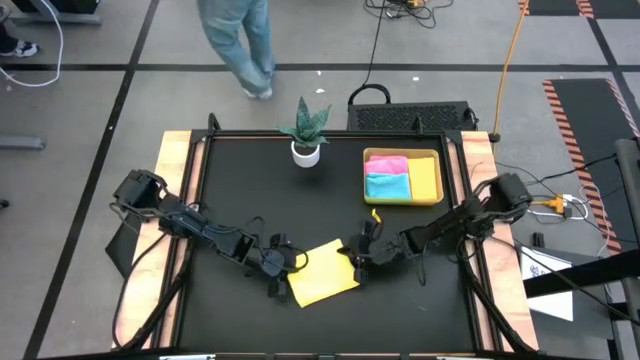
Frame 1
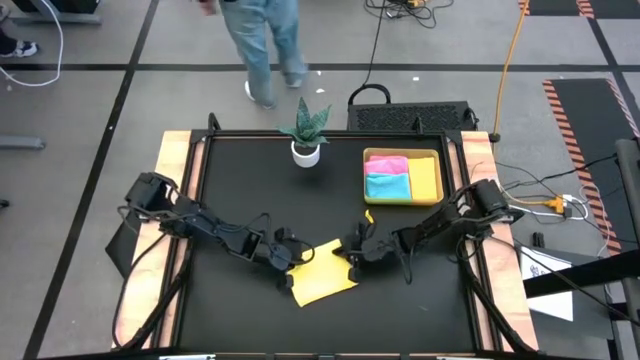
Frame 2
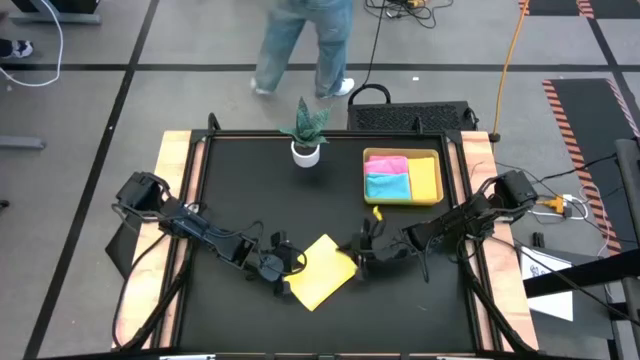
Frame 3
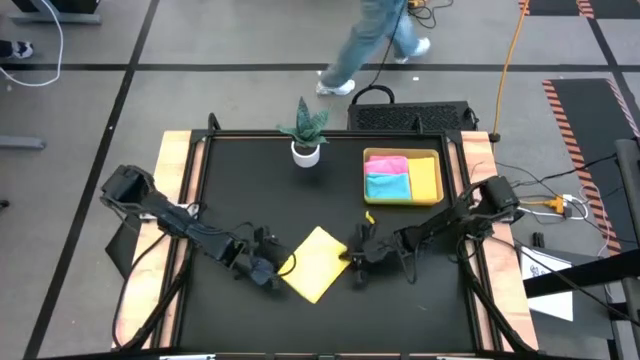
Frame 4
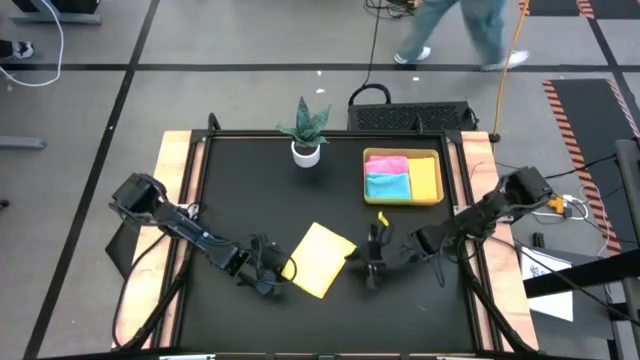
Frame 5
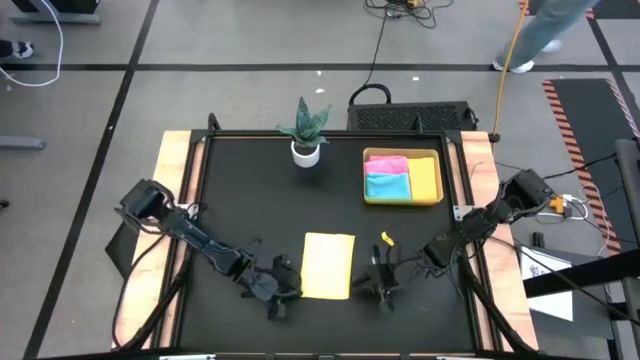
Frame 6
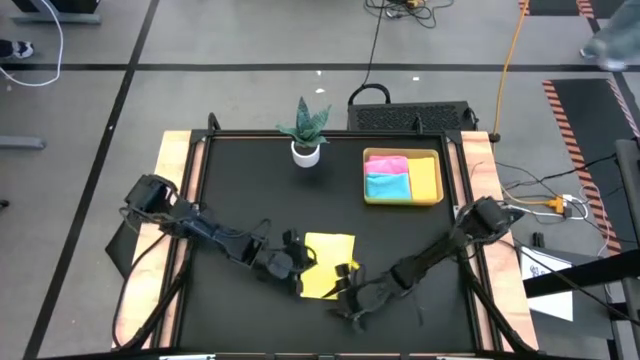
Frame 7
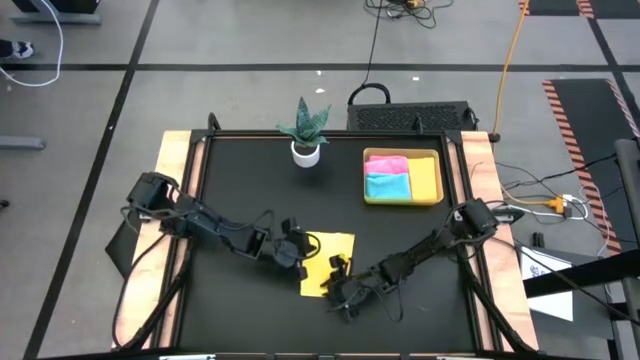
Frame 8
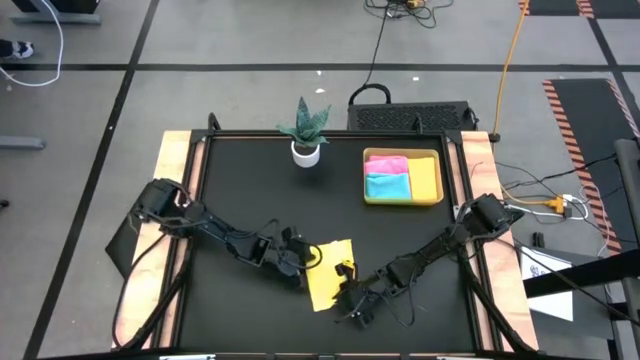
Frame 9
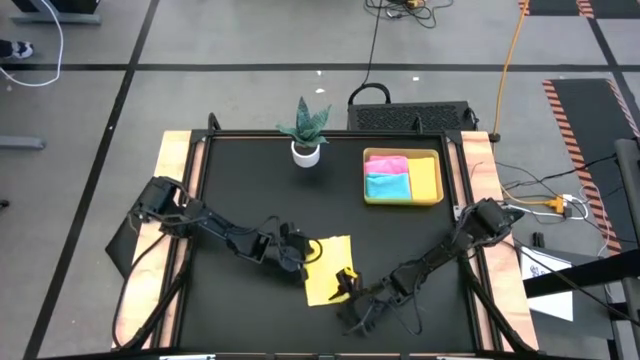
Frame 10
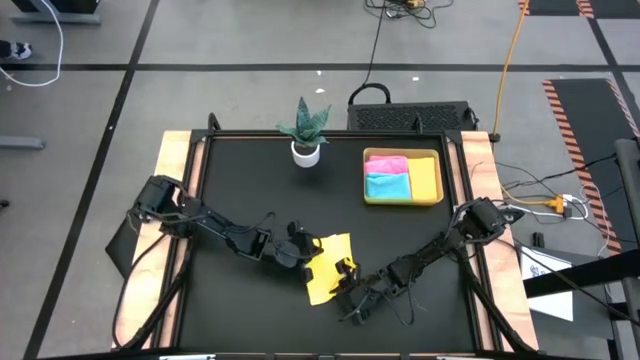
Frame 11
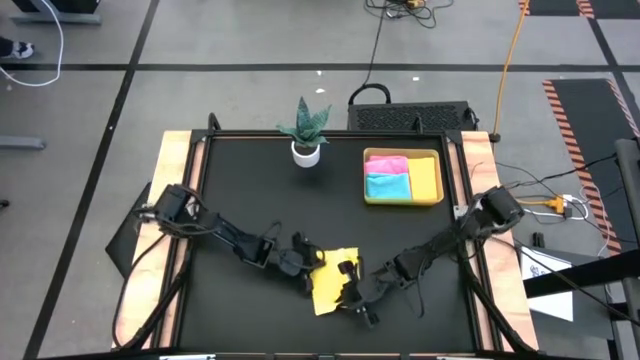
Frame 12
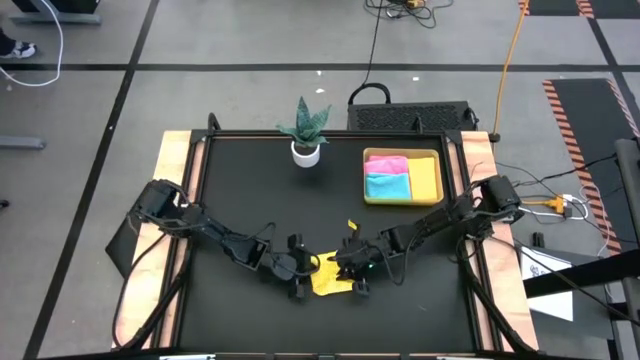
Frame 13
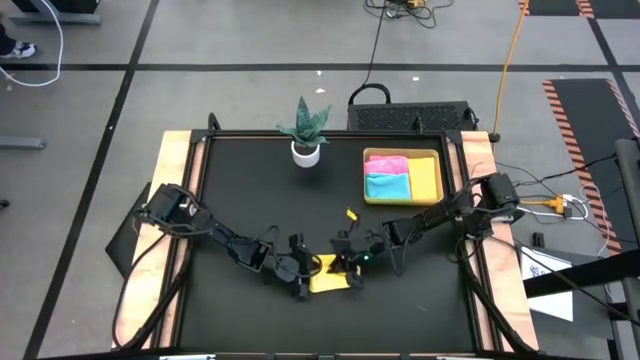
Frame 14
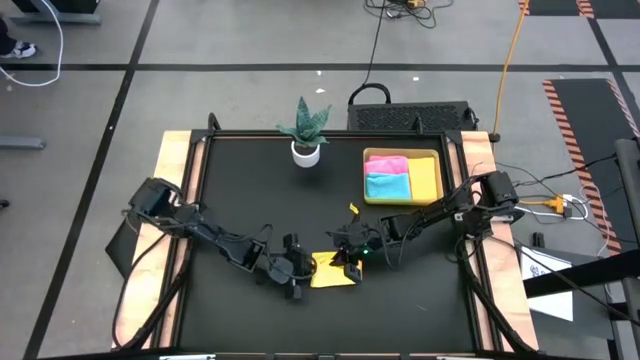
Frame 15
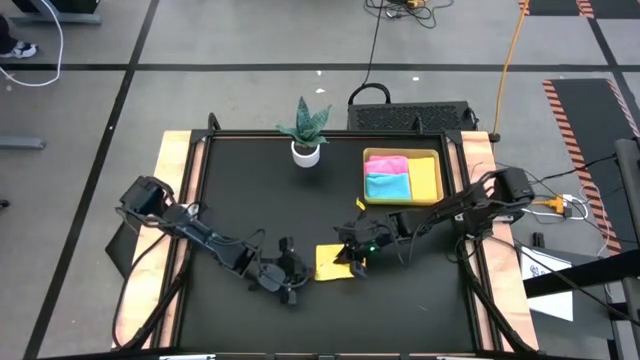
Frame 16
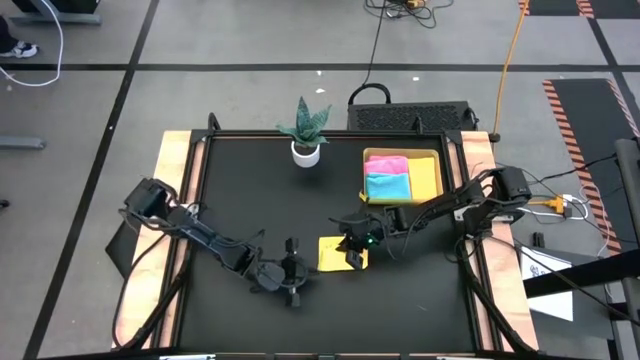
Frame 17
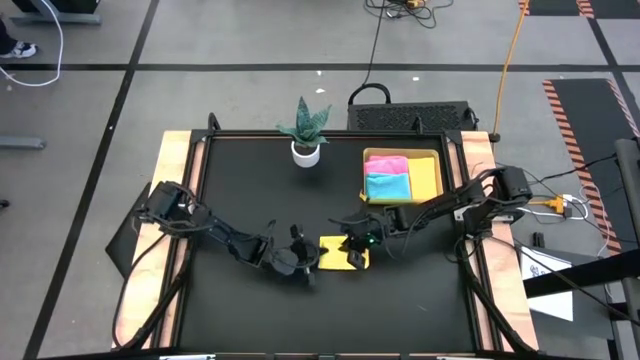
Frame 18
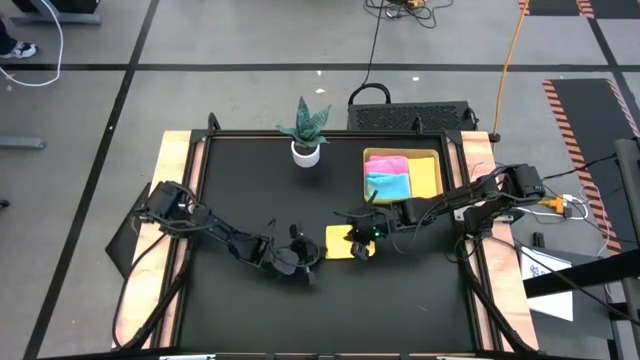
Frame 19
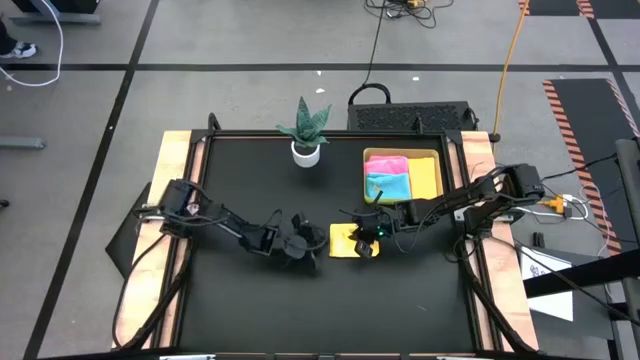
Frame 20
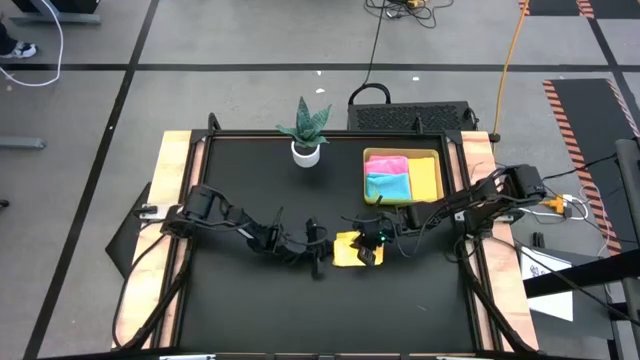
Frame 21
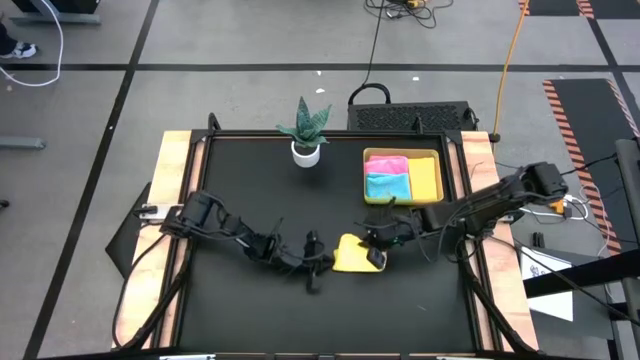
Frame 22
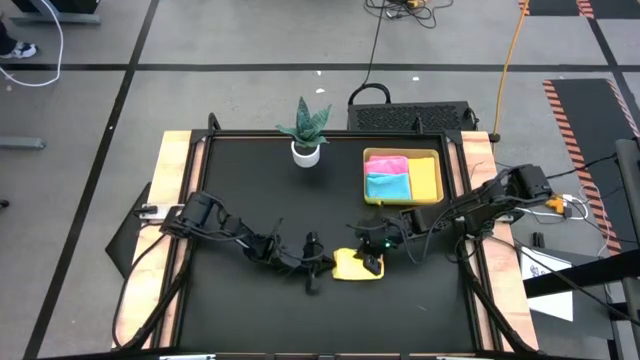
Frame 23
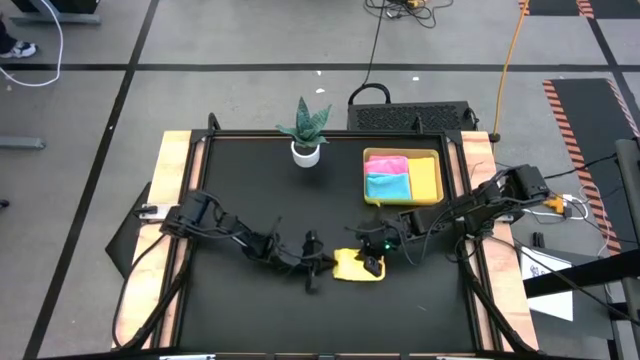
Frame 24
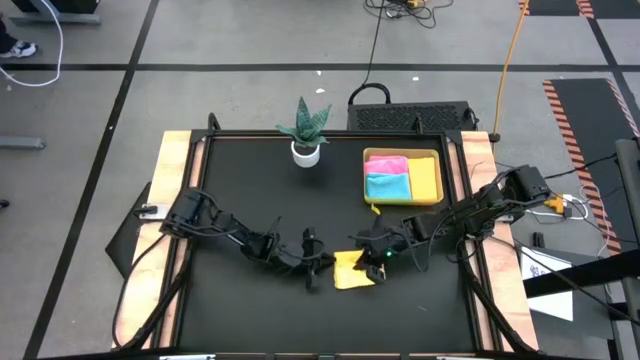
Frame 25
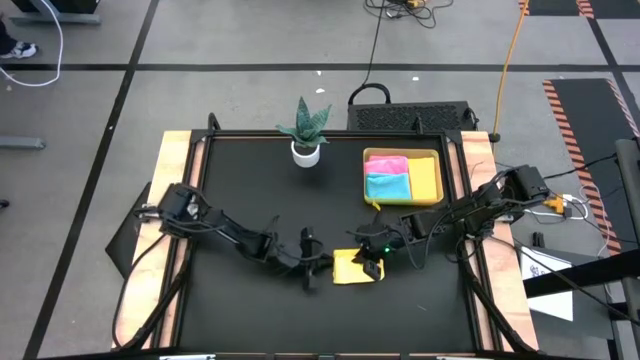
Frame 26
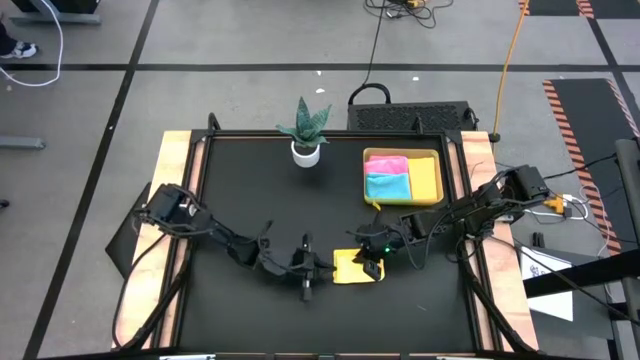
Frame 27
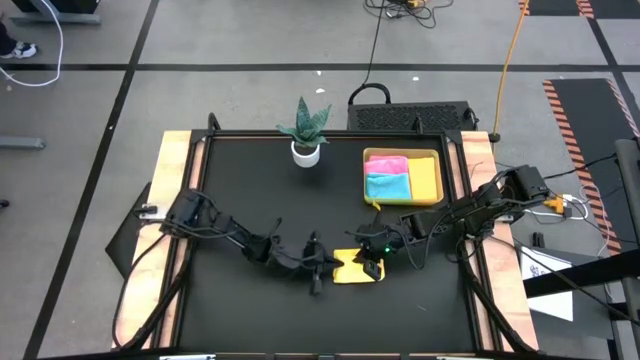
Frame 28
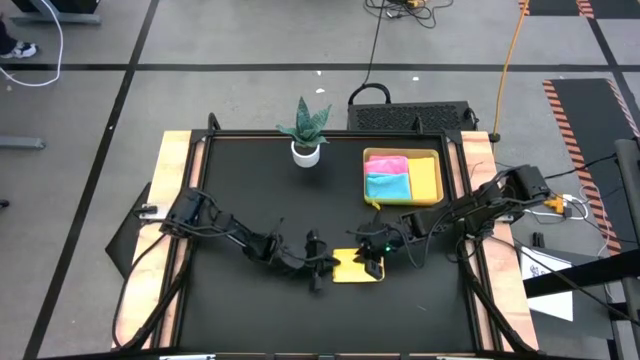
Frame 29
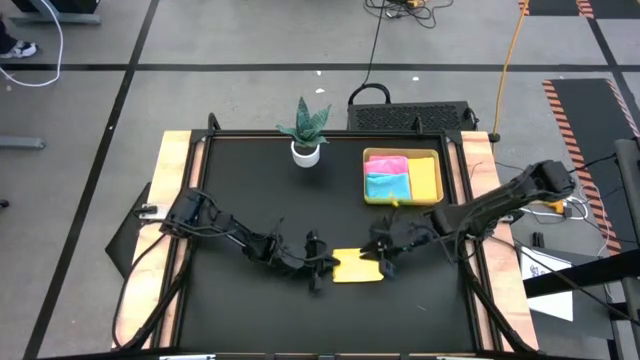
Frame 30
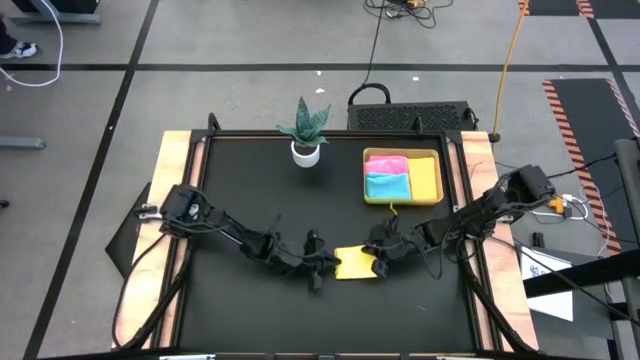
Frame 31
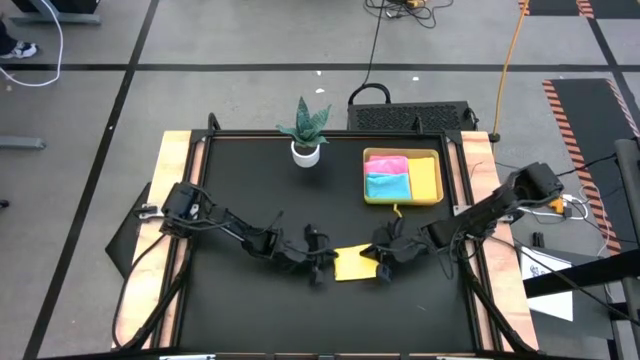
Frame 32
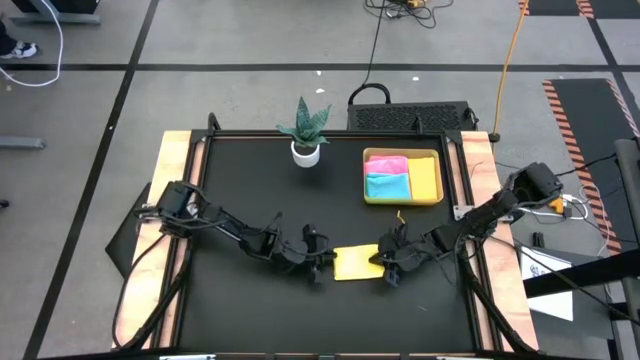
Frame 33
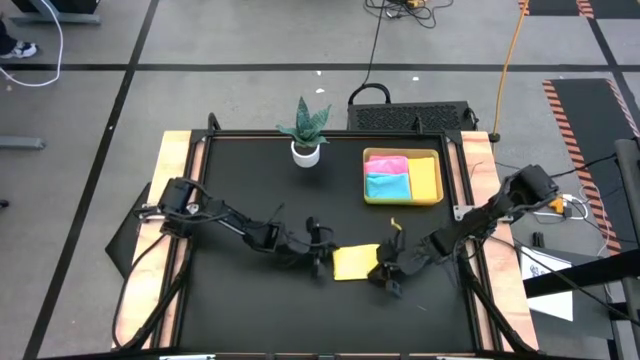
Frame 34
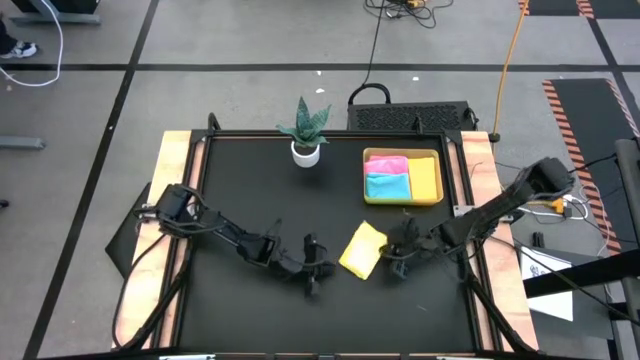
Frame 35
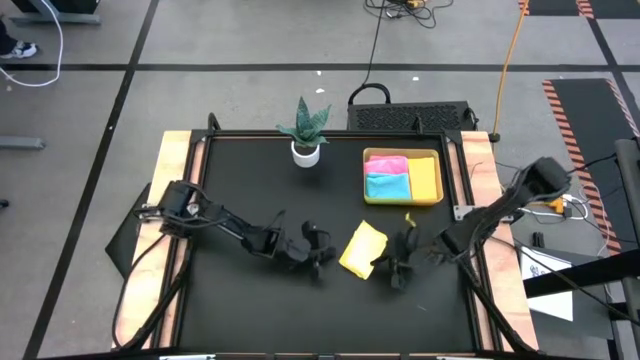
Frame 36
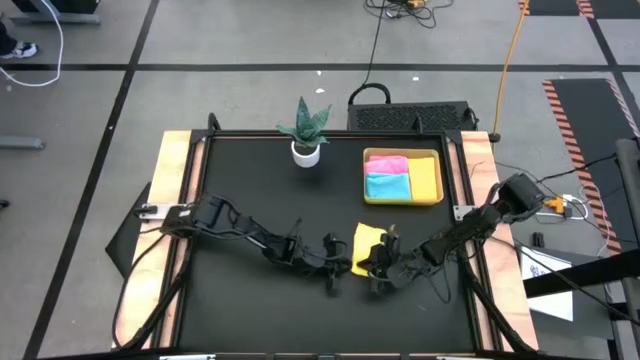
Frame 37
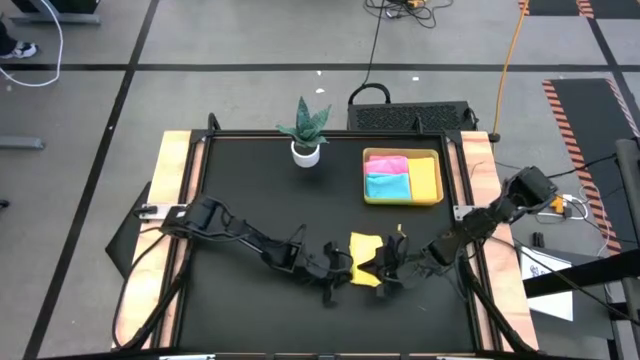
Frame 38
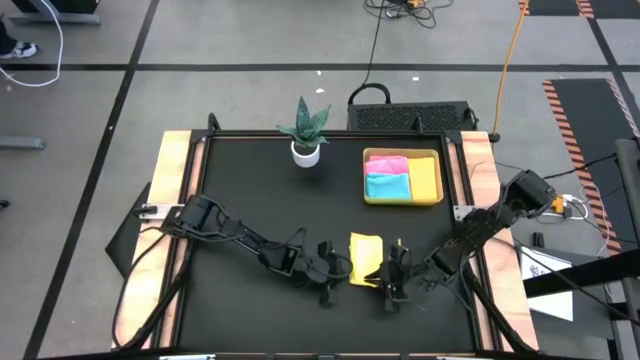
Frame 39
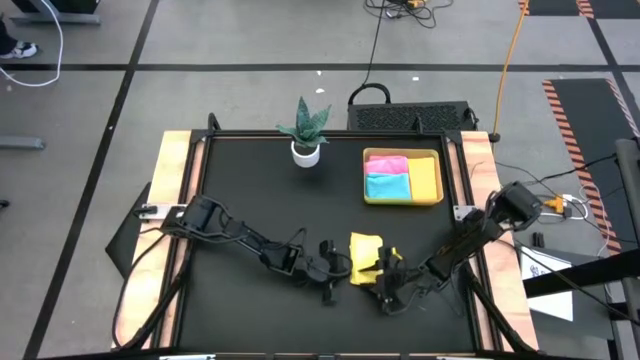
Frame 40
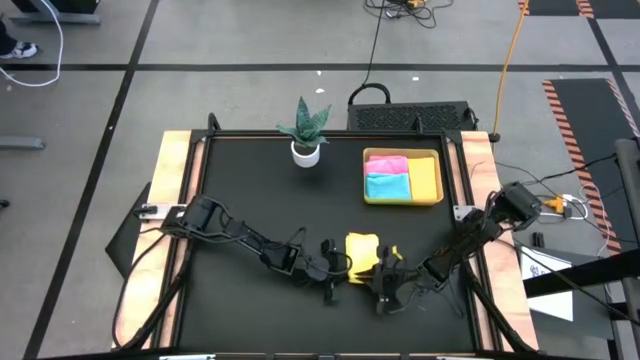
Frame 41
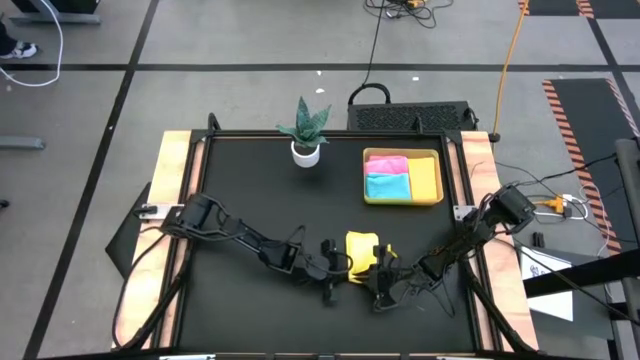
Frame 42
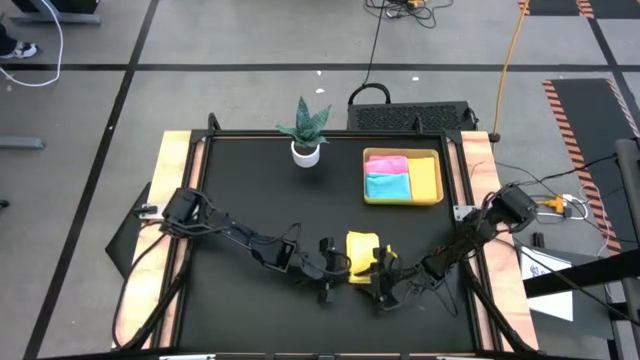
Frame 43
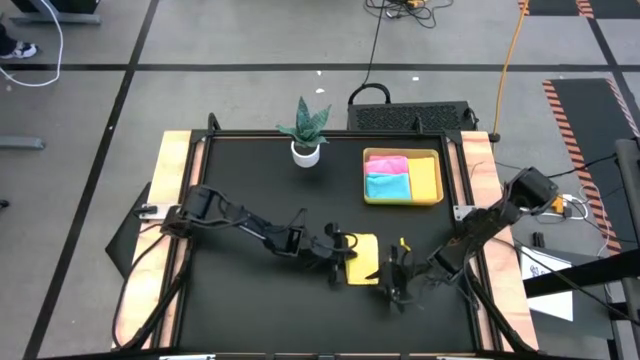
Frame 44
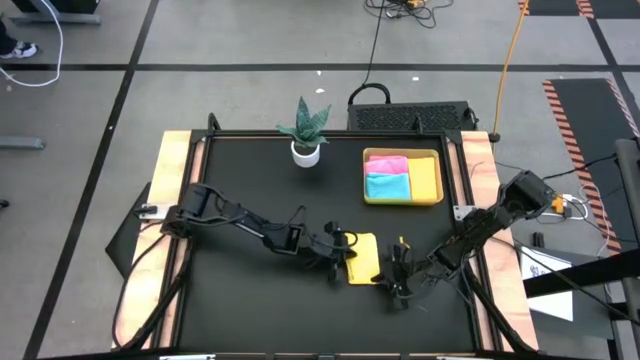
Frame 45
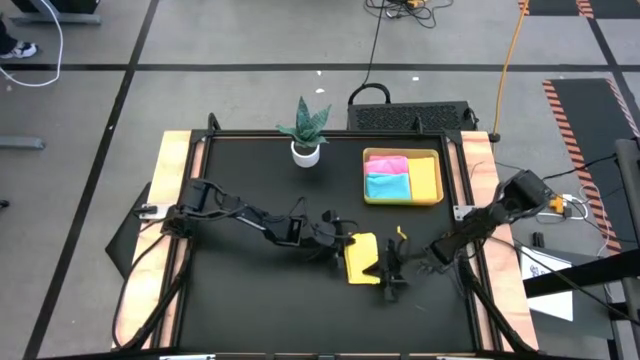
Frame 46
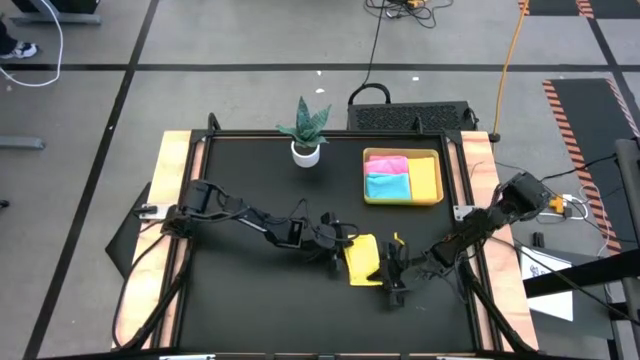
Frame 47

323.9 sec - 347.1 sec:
Task: Fold microfiber towels
Fold the yellow microfiber cloth
